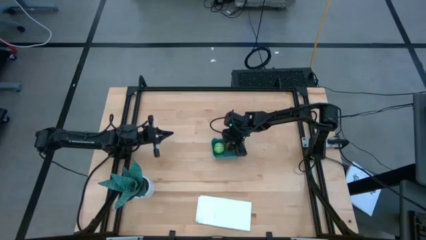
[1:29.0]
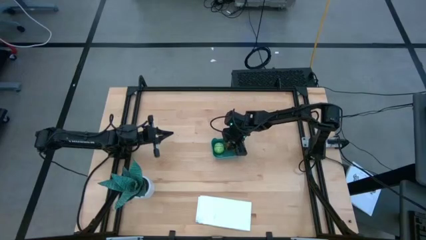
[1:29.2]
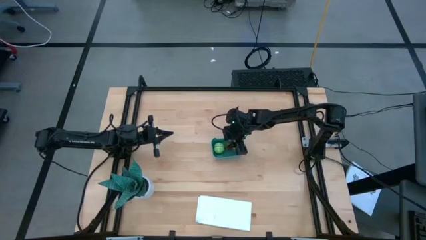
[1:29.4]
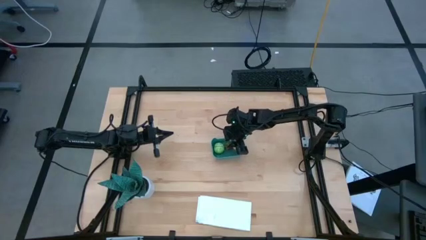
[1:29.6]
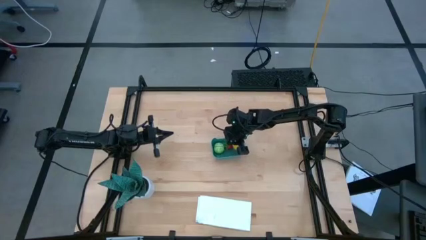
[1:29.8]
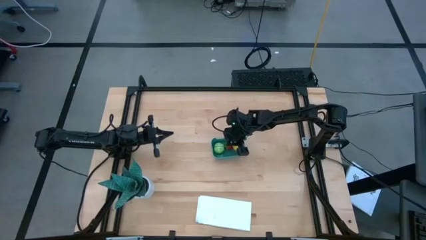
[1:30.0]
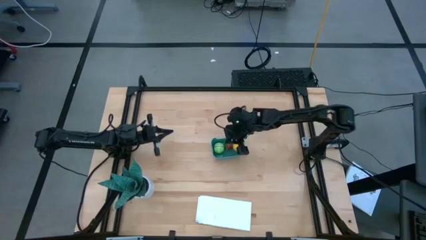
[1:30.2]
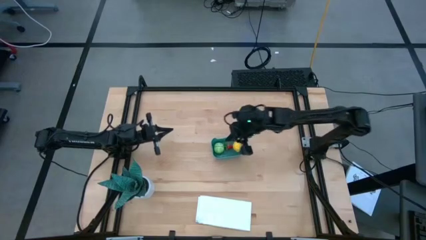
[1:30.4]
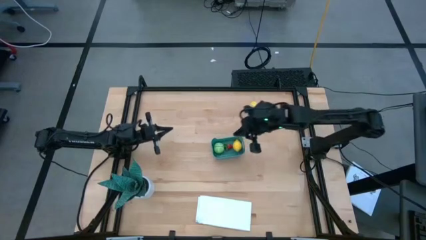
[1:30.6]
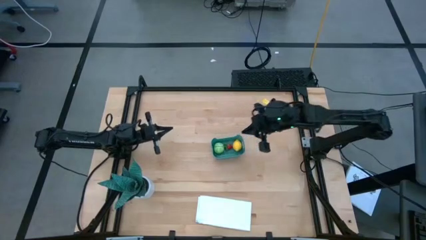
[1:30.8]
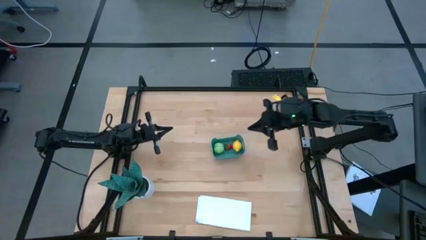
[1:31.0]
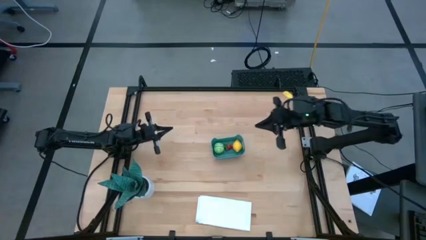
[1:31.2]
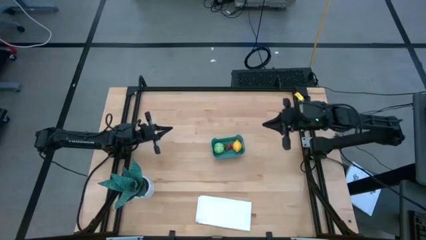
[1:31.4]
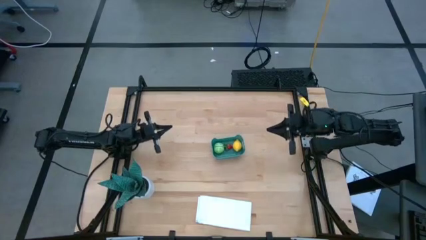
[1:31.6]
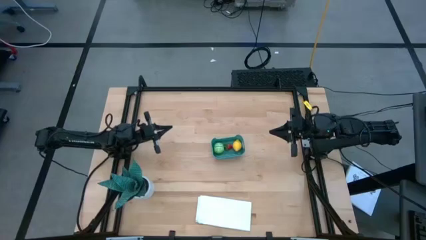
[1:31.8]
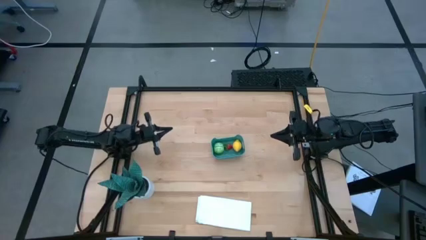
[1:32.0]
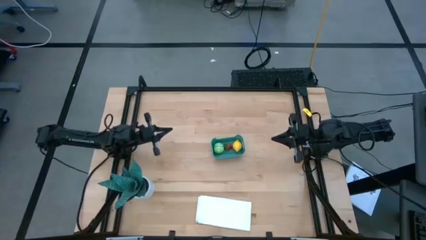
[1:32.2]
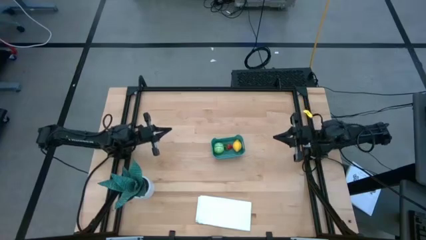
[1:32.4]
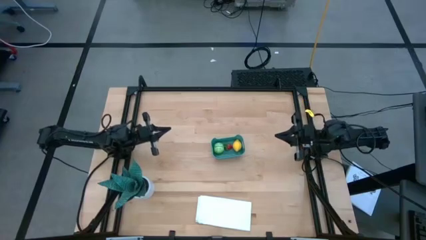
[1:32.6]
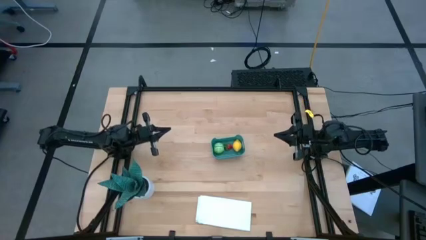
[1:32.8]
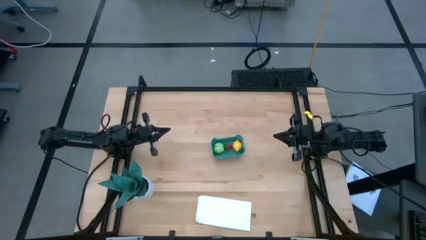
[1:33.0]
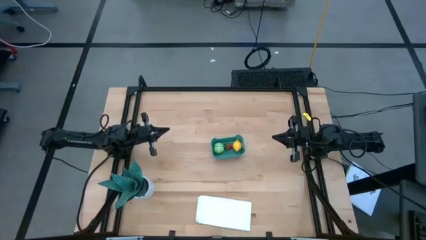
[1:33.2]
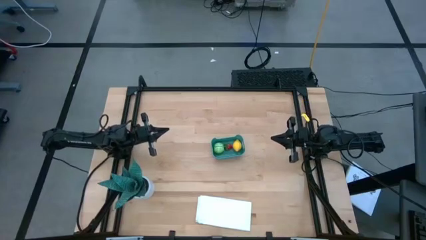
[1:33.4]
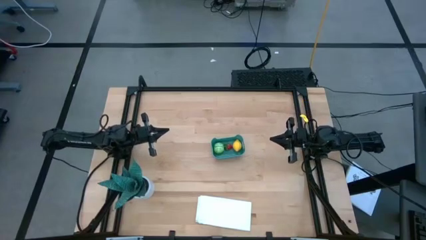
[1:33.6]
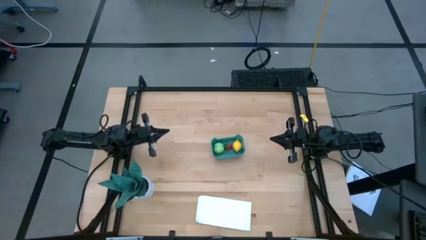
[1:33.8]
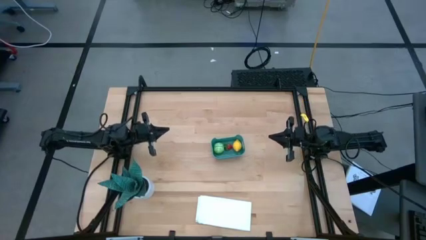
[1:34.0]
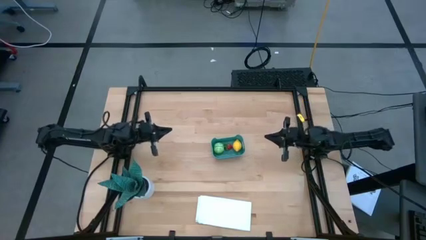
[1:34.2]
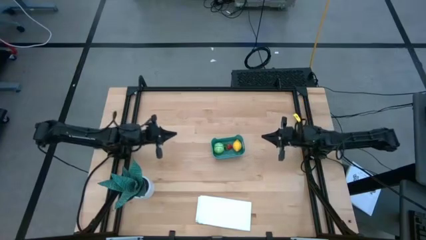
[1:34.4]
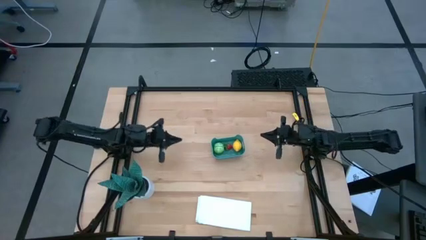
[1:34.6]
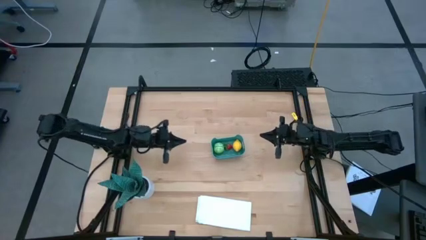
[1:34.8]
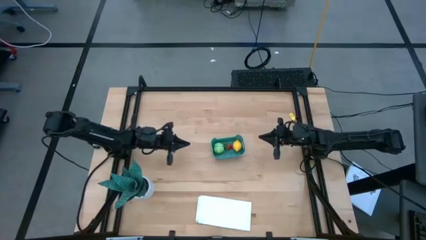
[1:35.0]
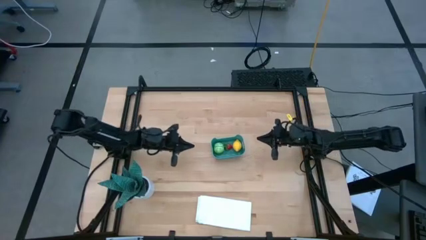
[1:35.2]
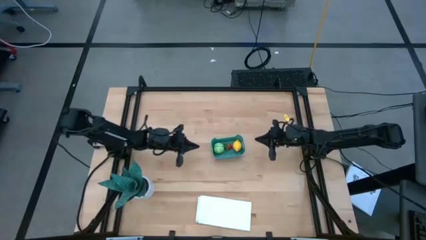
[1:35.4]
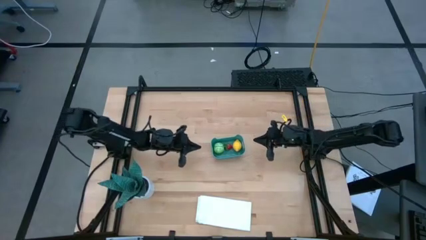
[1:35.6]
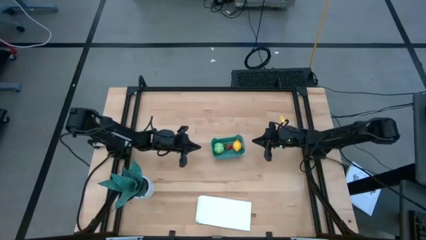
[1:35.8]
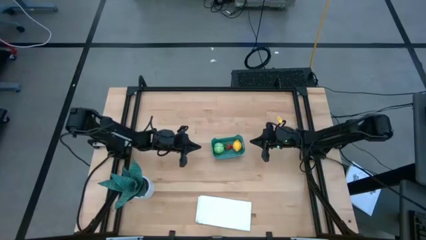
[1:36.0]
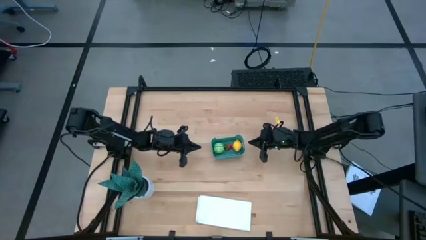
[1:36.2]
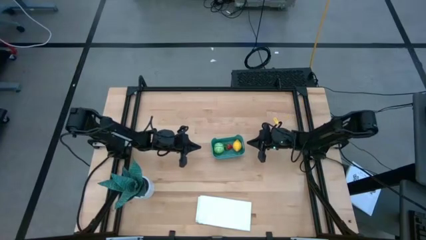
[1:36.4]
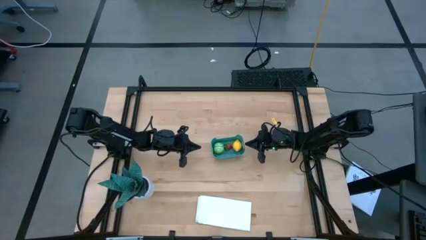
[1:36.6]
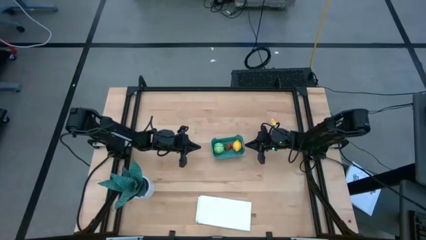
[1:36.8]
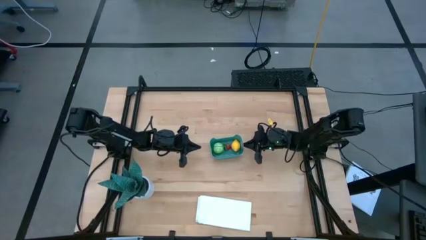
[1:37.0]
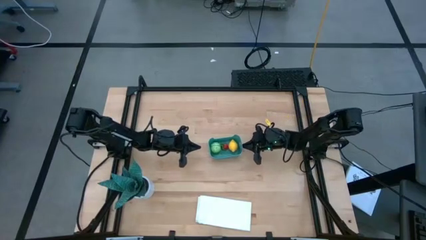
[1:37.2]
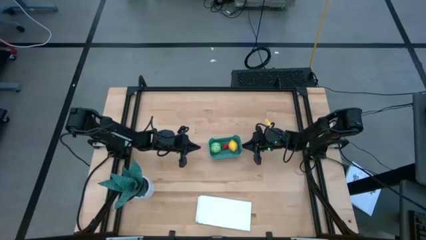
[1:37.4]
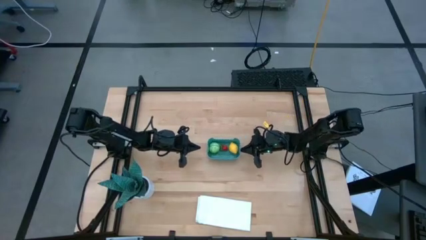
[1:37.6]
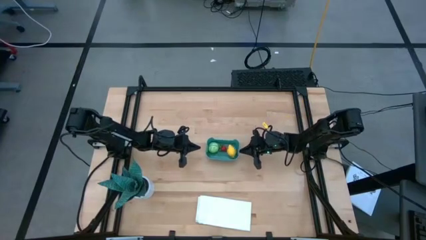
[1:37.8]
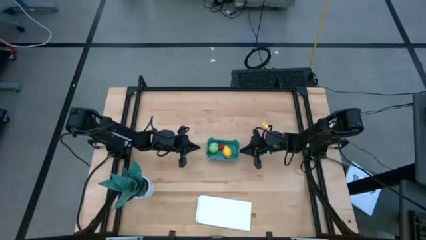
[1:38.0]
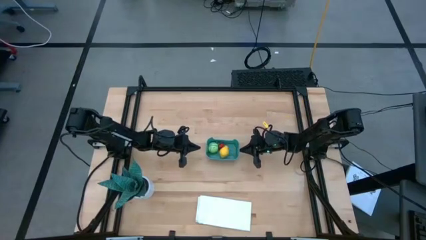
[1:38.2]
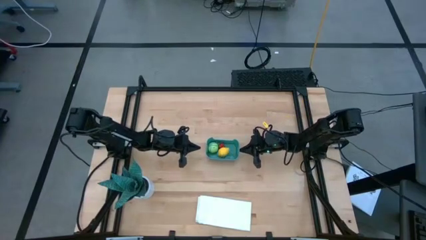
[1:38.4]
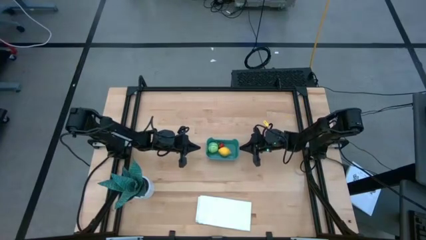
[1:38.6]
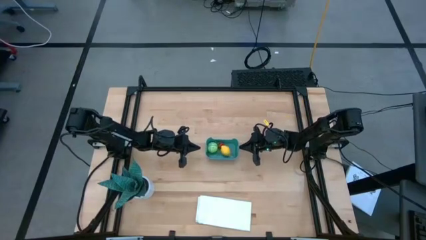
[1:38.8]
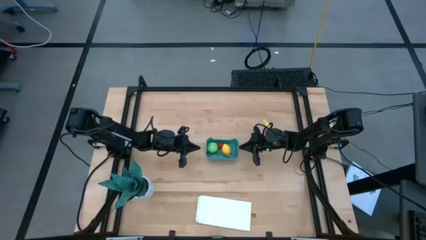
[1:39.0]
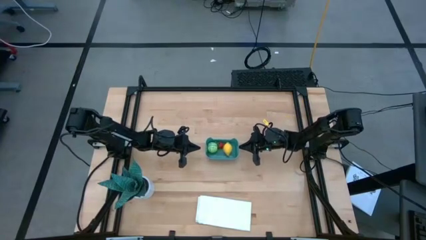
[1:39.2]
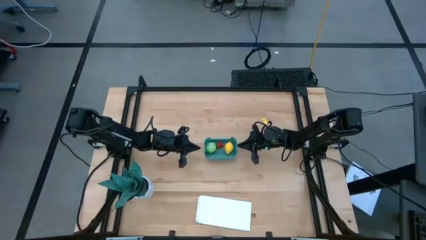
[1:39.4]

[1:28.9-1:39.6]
Task: Pick and placing Produce into tupperware
Adjust the green bin

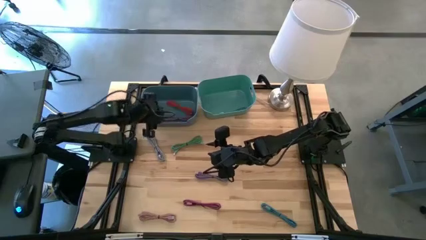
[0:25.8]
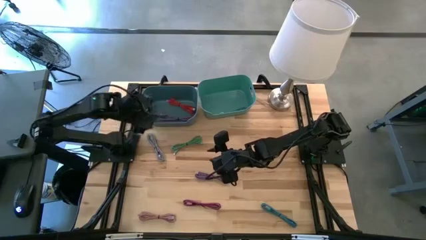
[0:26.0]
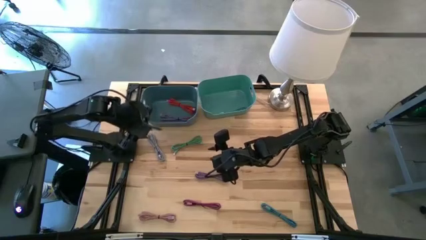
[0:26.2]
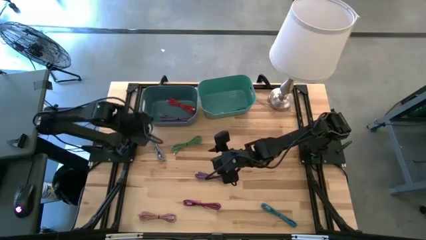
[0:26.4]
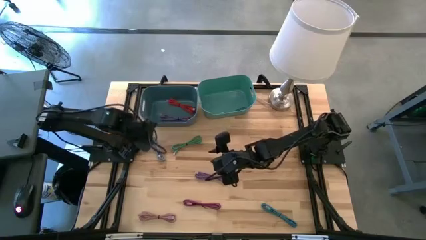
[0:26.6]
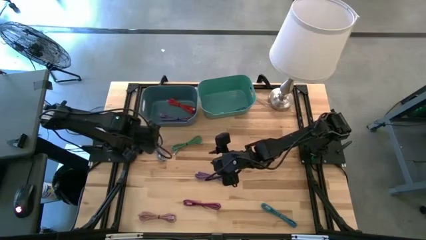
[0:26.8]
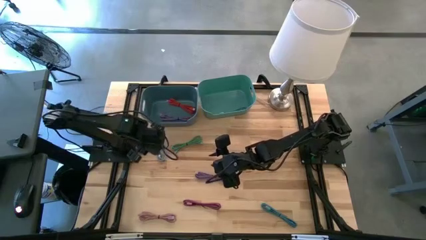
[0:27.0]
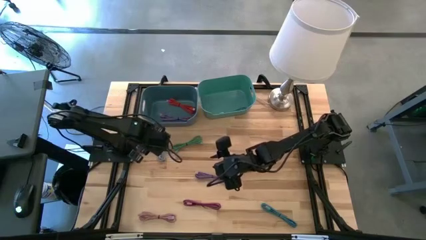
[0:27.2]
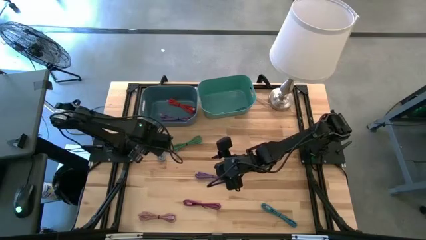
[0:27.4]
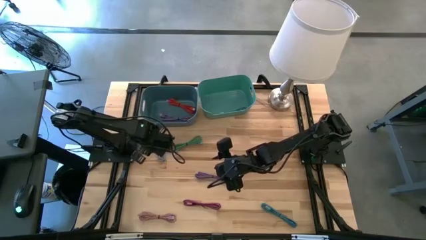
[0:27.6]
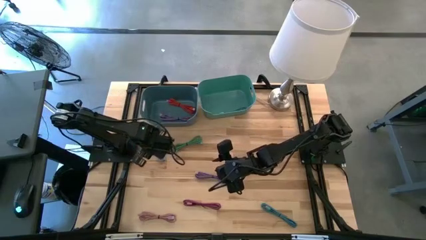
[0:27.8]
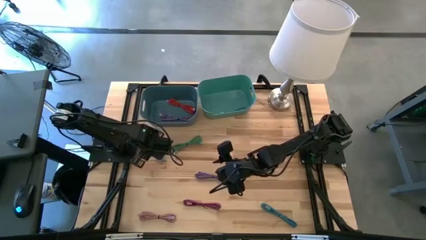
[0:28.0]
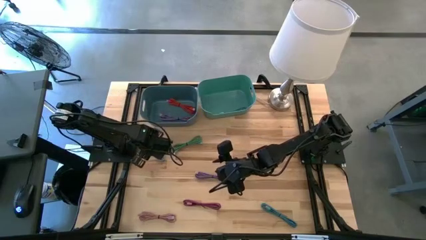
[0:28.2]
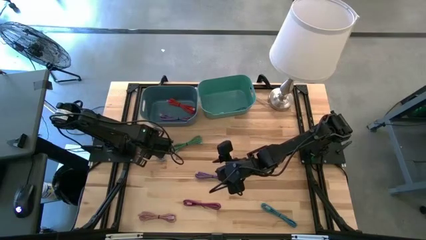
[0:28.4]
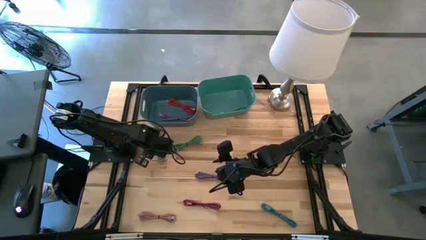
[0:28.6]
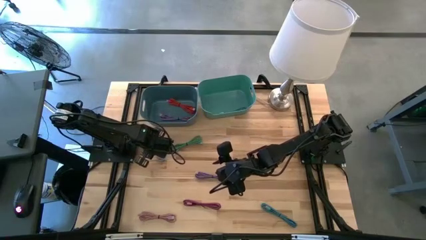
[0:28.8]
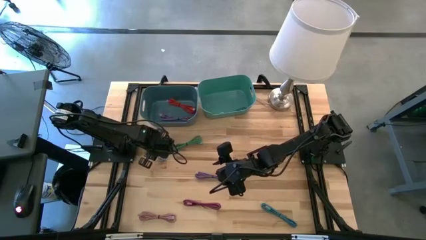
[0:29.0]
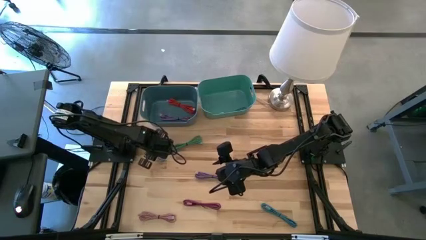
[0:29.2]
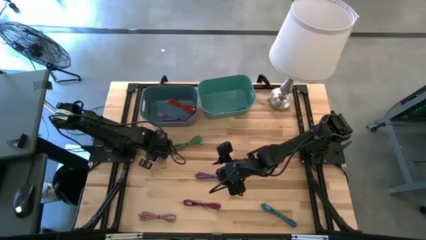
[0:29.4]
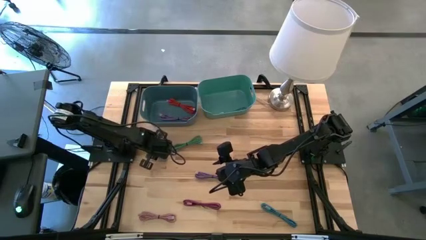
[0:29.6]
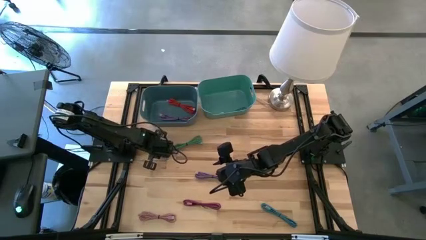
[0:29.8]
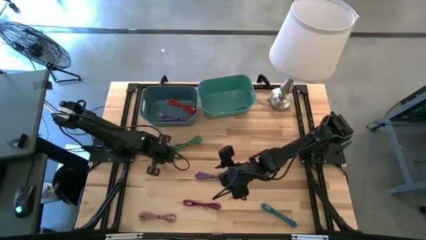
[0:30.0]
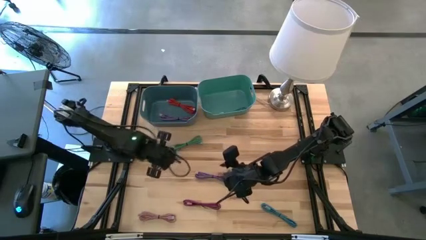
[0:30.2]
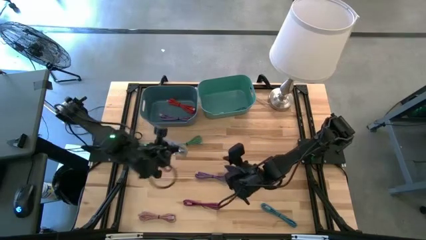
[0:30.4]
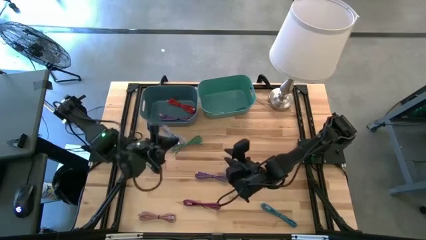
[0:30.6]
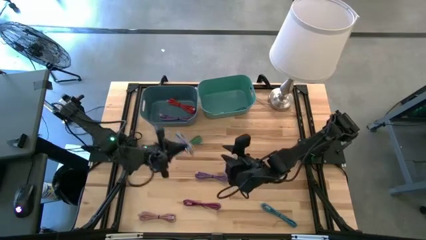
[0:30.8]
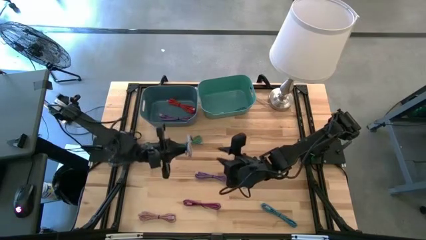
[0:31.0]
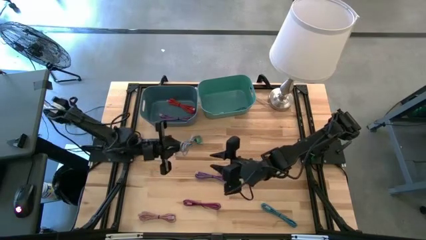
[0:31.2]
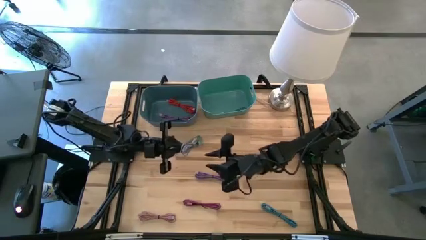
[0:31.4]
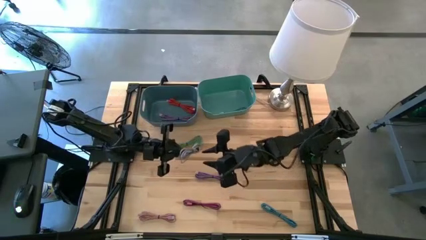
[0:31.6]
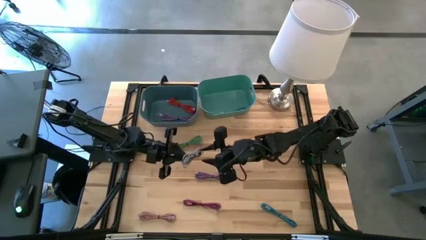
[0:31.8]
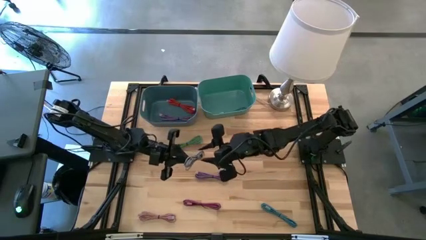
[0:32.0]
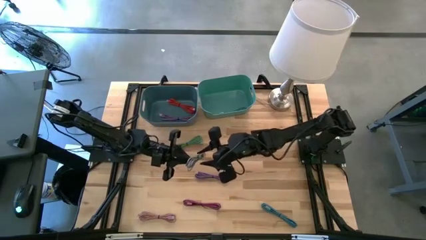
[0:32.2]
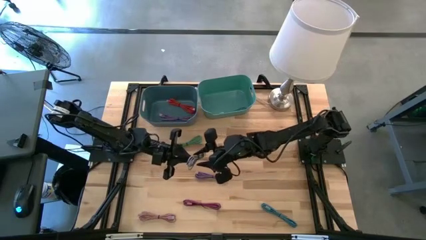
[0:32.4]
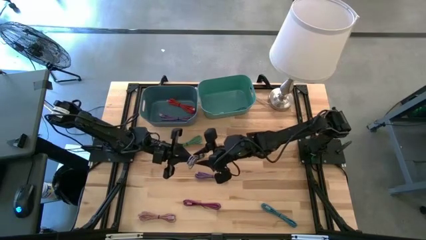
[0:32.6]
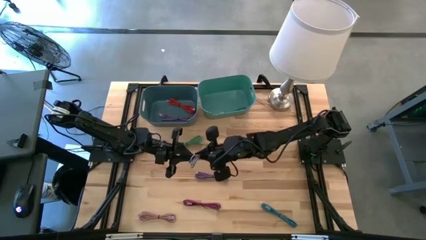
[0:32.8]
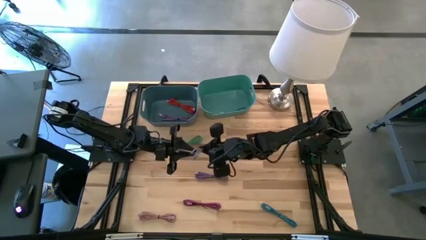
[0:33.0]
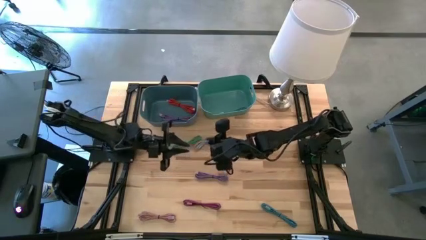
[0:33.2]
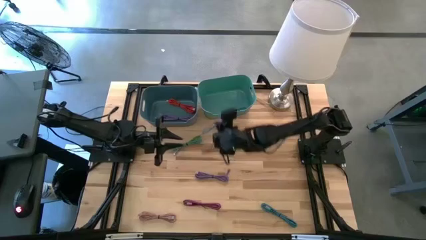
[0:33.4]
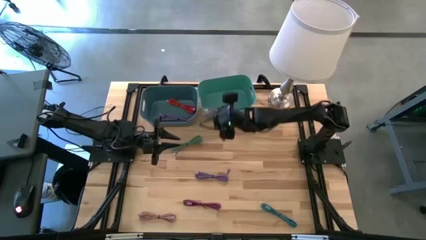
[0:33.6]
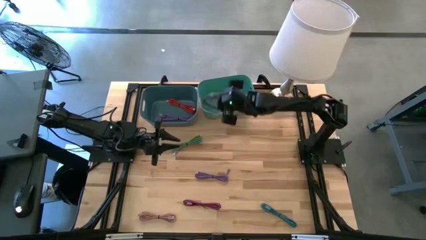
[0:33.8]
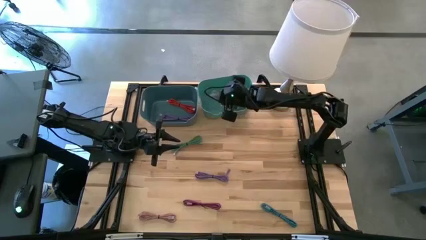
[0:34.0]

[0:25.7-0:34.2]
Task: Pick & Place USB Port
Put the black and white charger cable into the green bin
